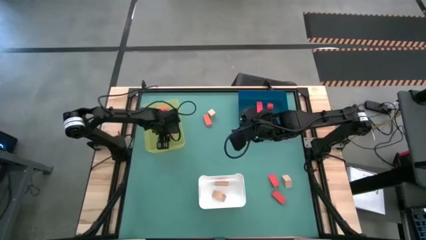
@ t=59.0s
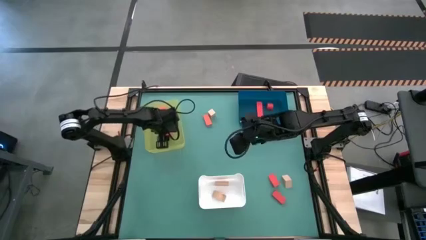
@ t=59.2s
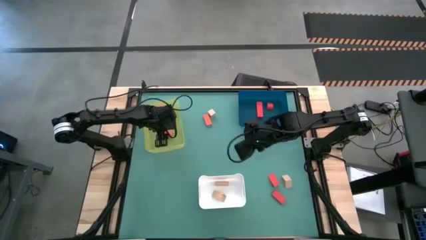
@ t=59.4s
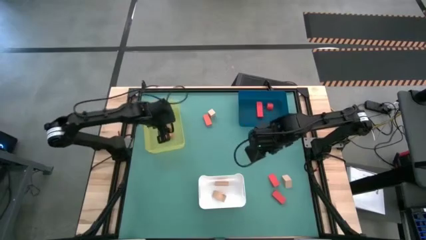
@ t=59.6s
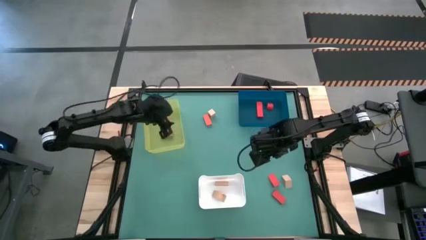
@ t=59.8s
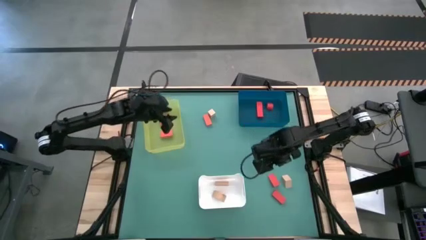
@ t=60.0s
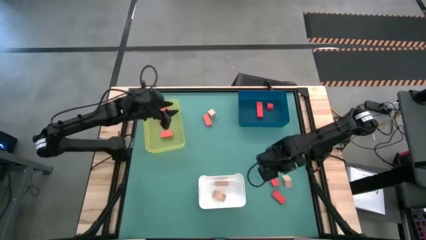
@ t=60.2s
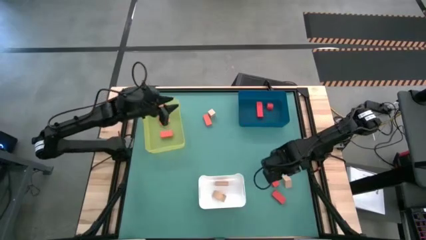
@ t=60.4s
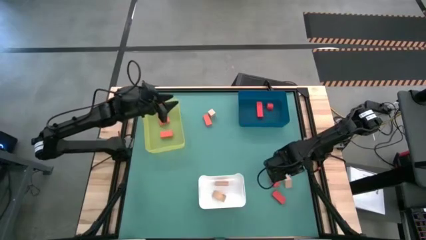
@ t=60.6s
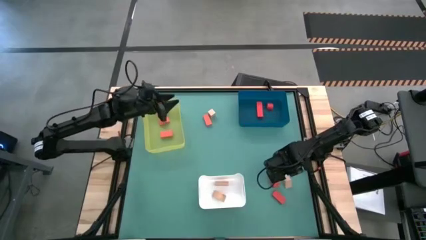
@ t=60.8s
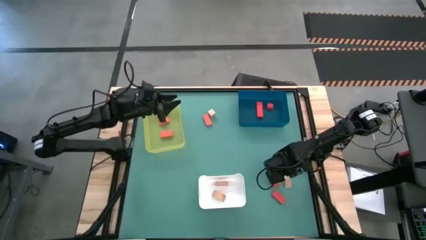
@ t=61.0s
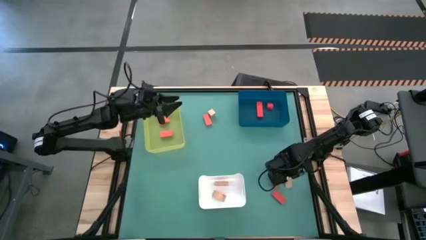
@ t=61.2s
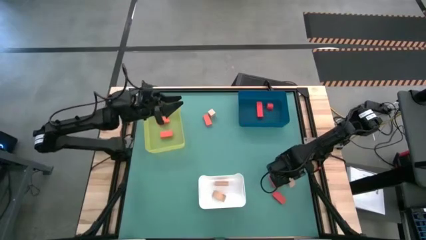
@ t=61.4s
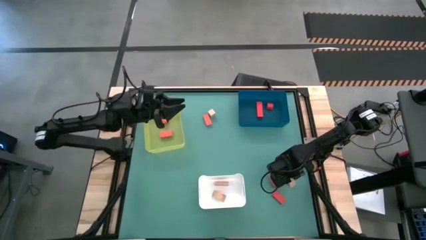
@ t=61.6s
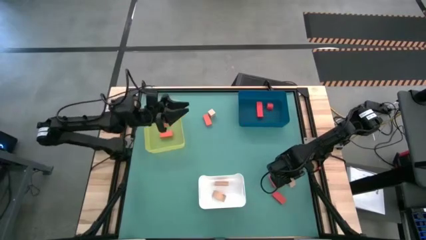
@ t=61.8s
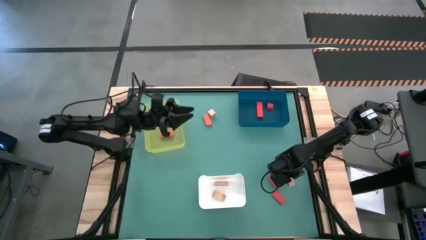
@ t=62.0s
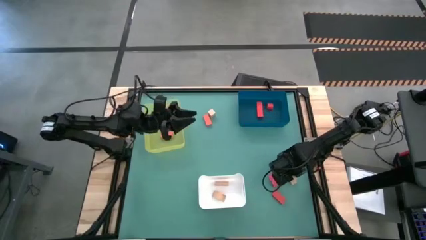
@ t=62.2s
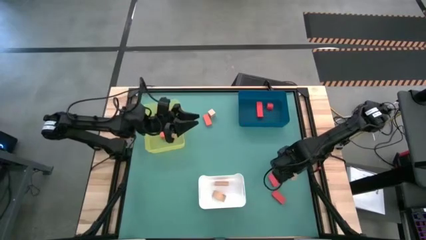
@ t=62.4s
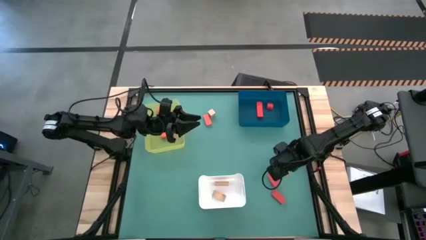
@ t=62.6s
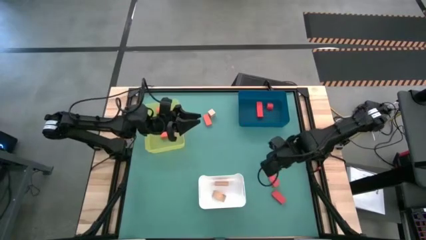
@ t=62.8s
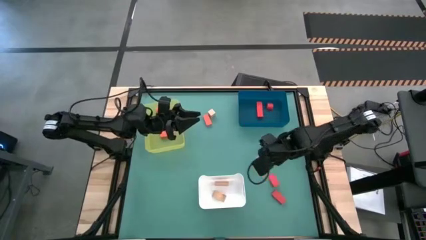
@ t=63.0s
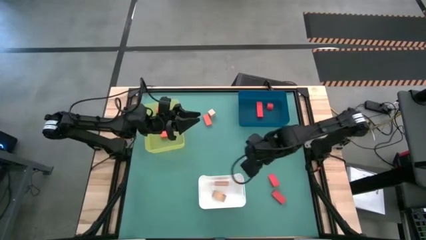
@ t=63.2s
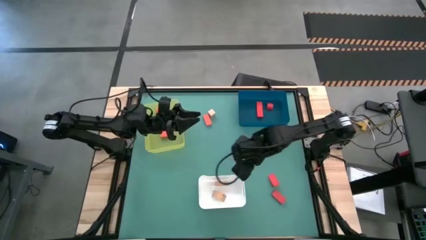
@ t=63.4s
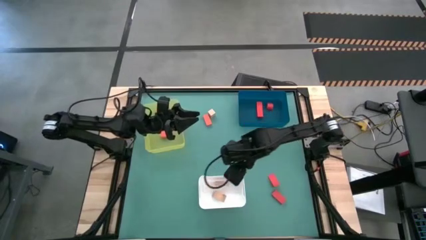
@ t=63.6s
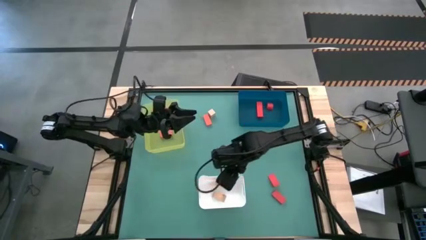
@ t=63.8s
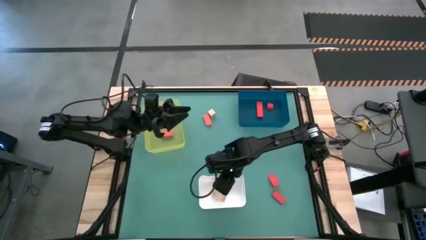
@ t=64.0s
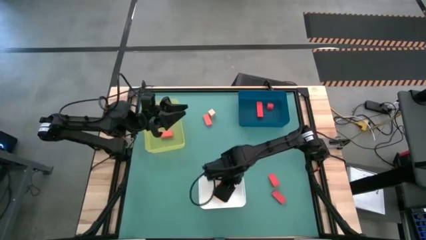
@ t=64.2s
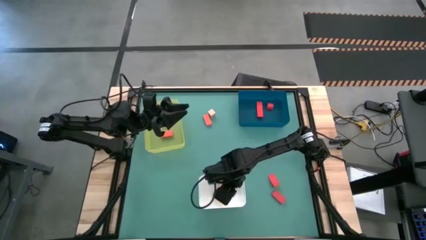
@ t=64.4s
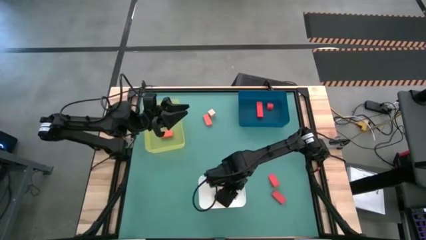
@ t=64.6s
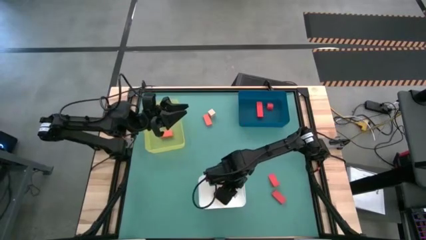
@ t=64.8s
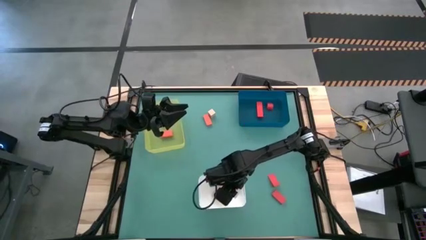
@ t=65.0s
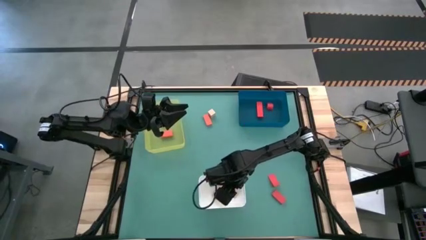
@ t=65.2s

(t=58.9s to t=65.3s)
Task: Sort & place blocks by color
Put the brown block into the white bin

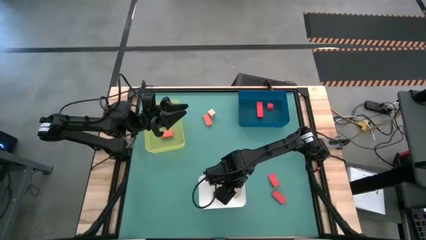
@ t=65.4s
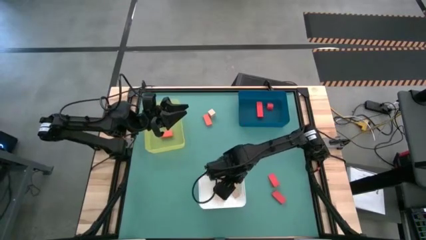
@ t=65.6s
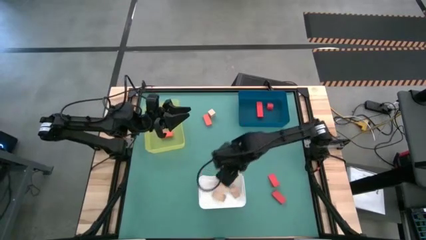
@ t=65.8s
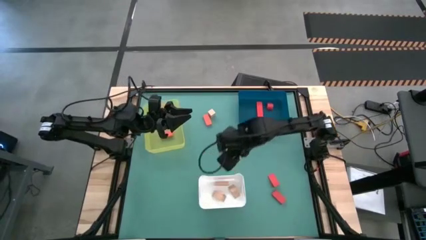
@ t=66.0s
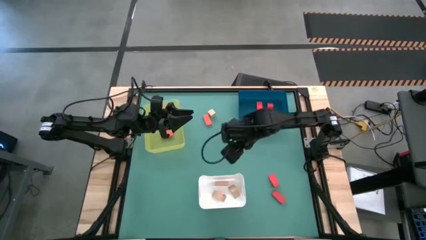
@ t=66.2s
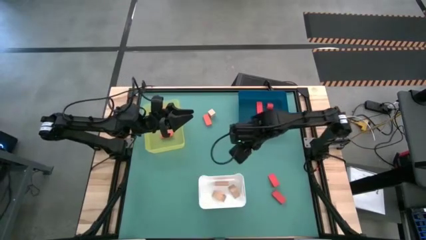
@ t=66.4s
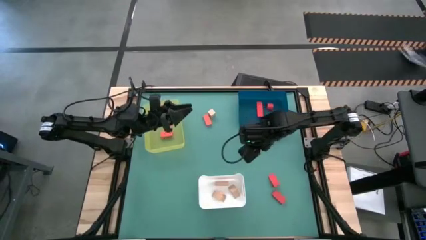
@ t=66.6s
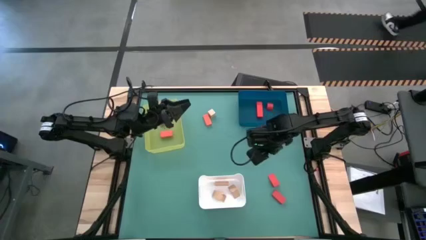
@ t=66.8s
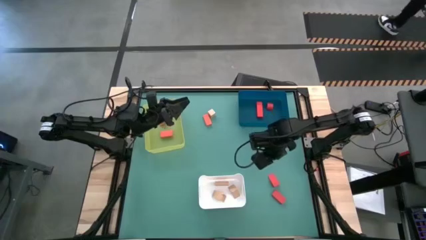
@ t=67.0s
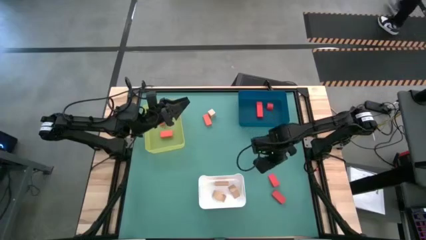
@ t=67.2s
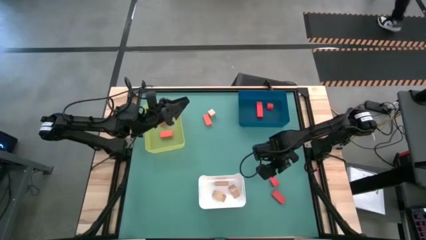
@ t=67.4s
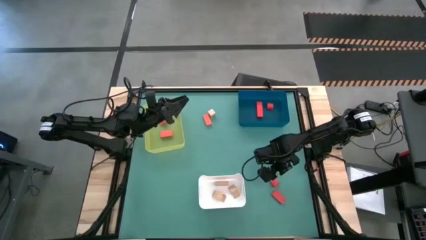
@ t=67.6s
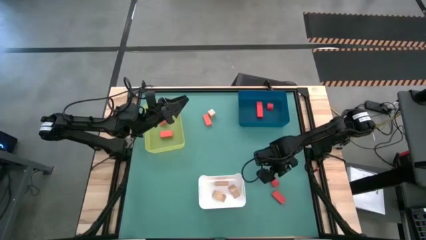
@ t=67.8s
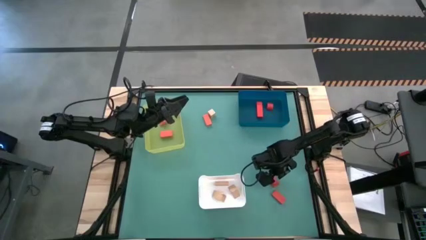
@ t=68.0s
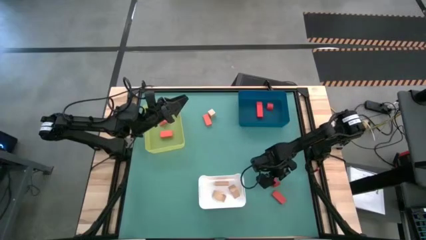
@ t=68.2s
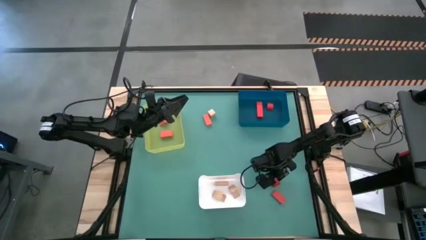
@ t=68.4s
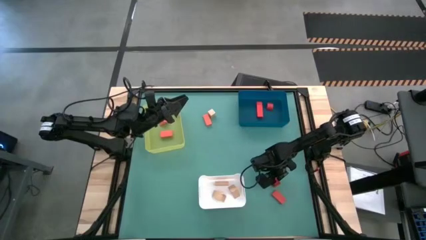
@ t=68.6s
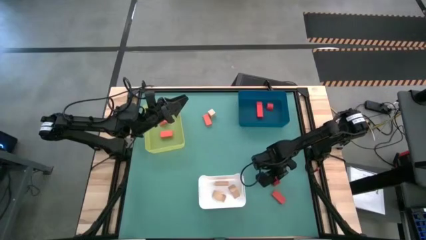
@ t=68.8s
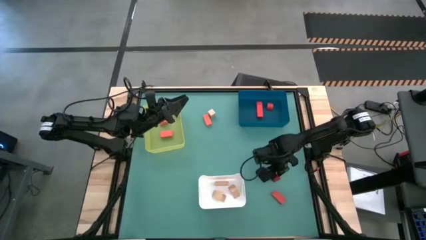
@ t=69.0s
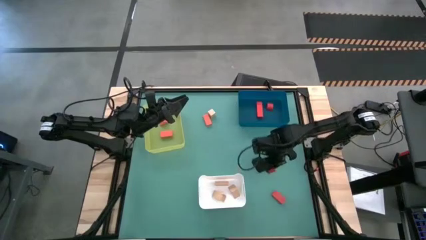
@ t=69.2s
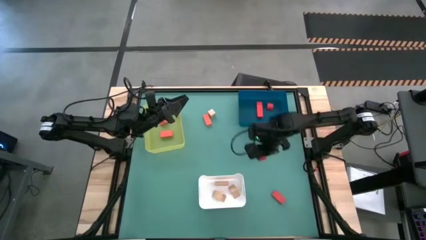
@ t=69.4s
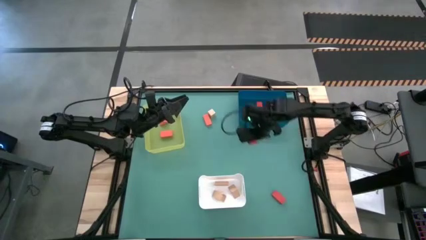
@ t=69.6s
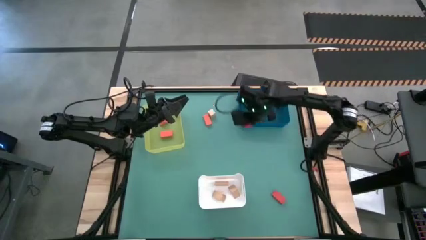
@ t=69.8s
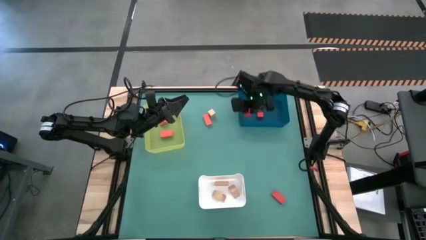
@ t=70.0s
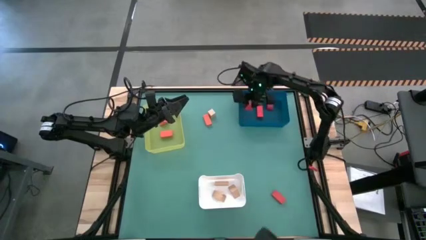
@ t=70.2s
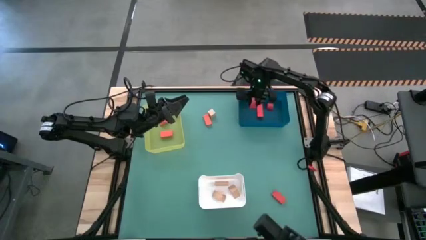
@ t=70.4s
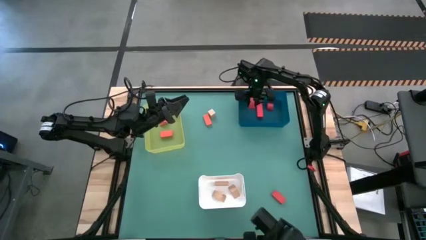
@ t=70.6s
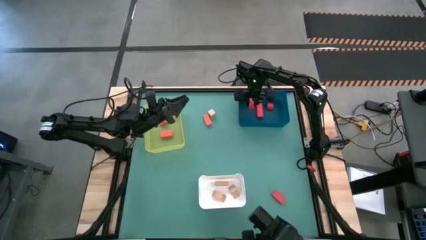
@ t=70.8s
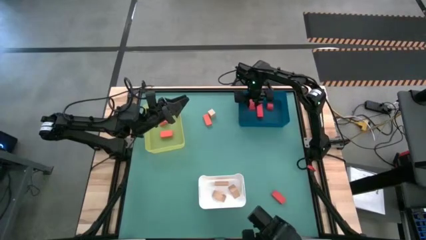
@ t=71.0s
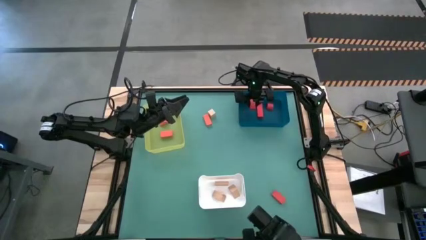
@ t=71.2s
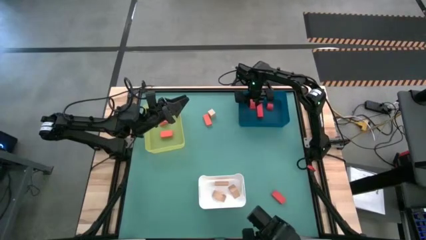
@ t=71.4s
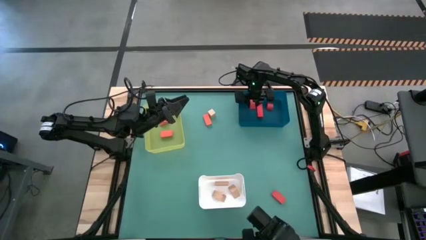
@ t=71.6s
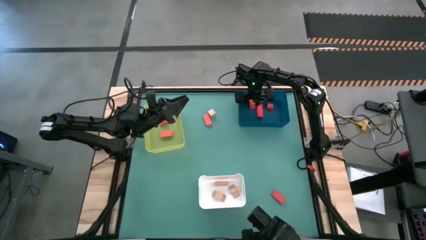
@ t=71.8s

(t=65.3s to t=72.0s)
Put the red block into the blue bin

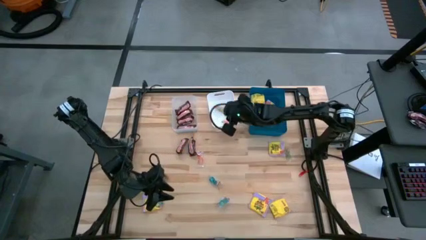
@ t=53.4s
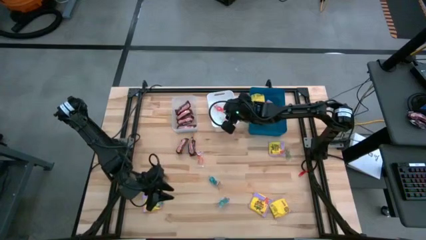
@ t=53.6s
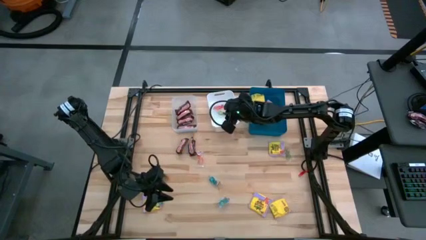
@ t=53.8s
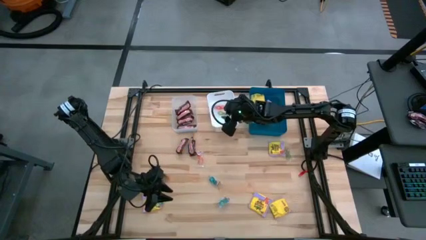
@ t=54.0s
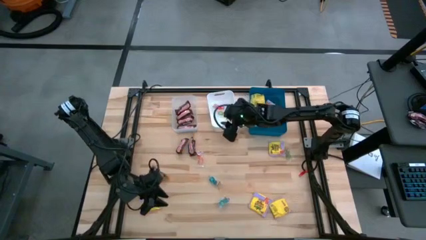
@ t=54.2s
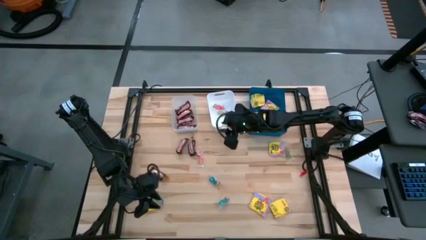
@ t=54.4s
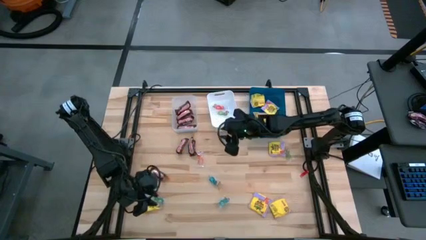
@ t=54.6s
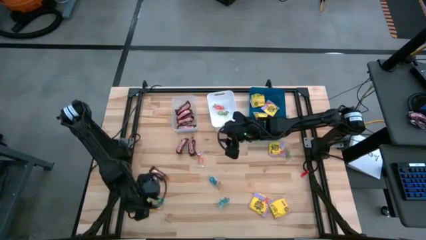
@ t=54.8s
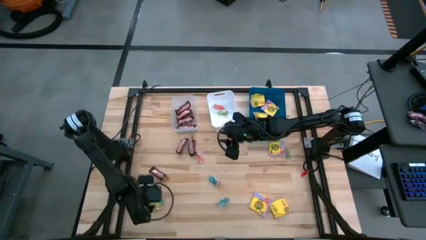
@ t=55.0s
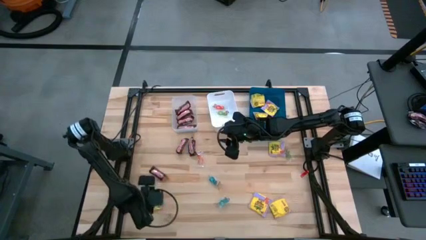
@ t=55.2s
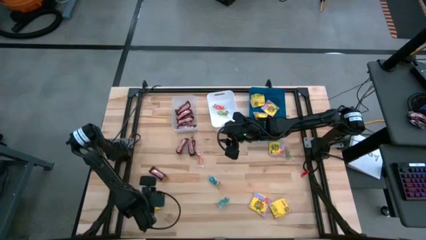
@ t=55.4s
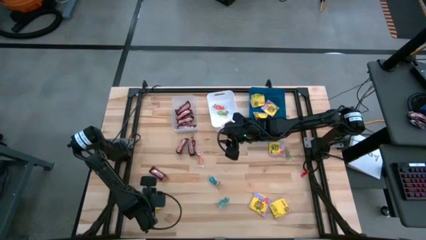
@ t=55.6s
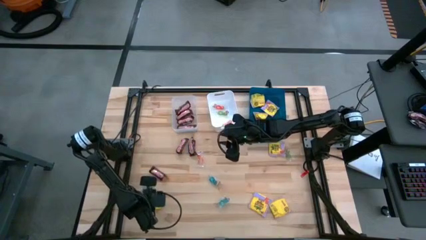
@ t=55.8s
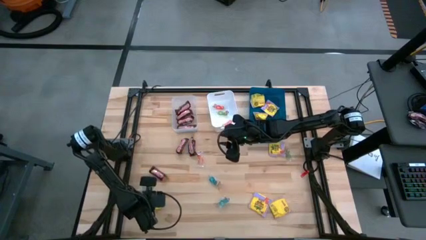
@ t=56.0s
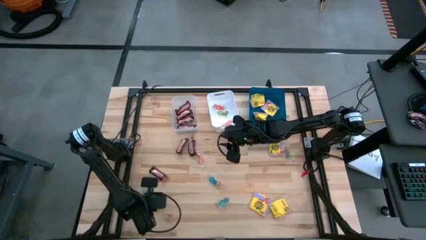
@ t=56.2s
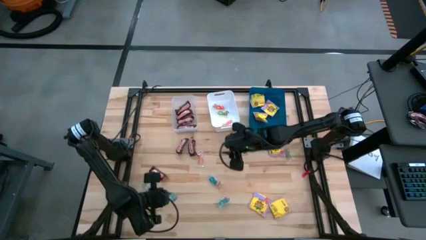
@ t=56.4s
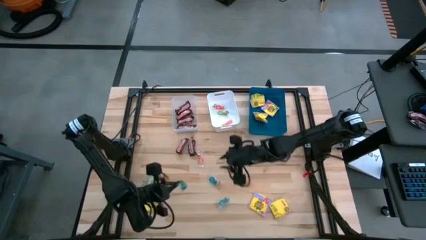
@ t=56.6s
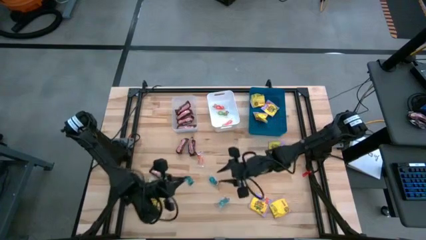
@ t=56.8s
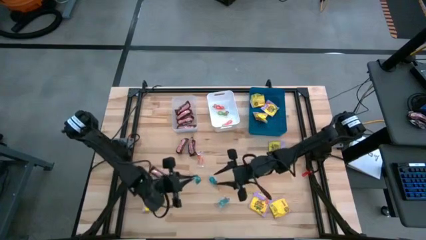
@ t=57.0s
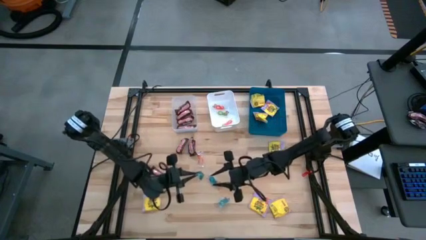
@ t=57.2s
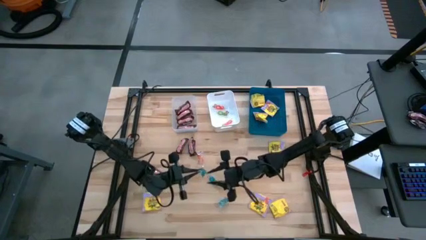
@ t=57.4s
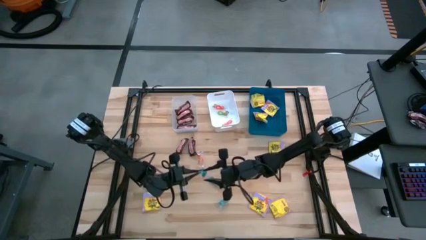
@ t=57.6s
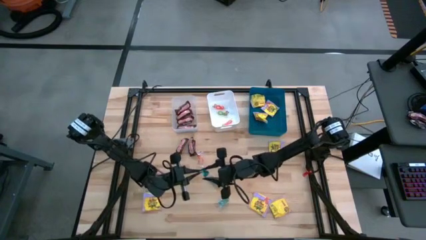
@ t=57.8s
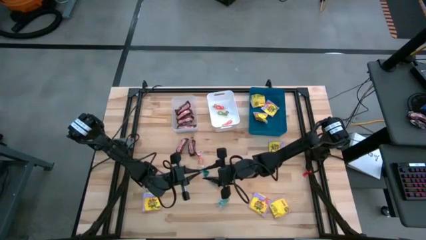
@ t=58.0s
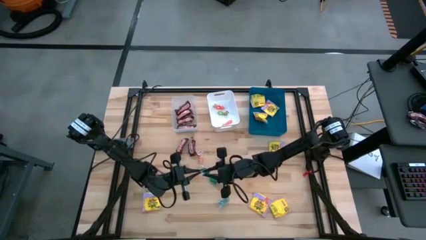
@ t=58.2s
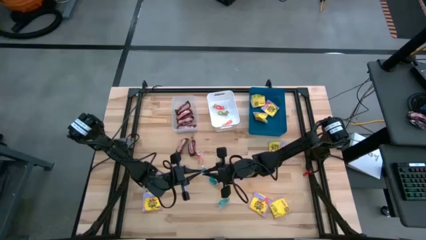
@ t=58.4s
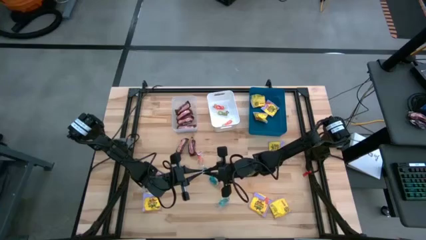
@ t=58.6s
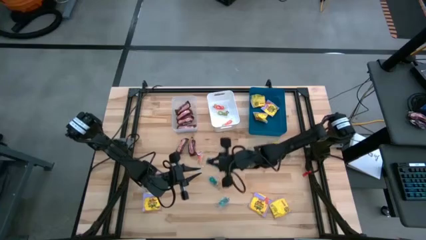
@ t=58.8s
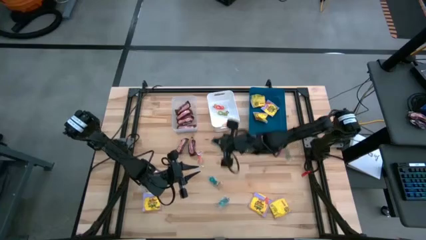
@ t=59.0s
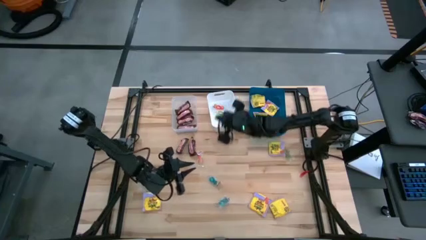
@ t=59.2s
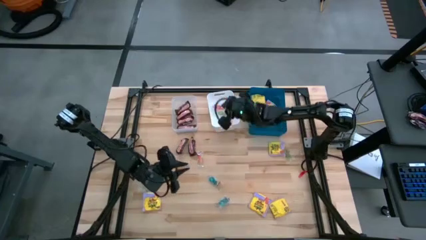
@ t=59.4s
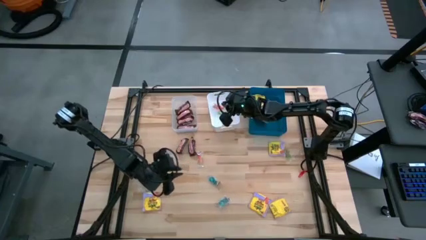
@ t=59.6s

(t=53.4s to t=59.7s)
Task: Sort candy
Put the bottom left blue jelly candy into the white bin
